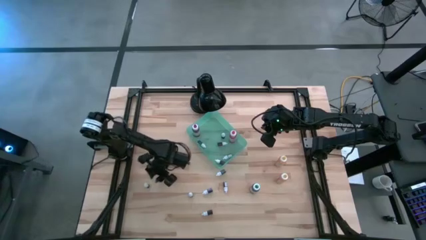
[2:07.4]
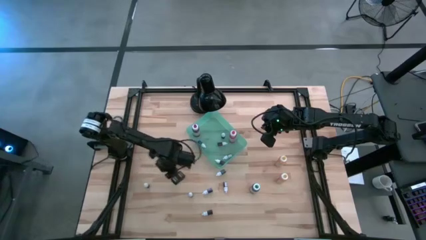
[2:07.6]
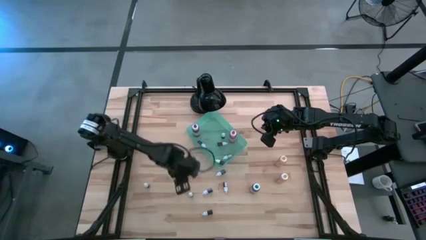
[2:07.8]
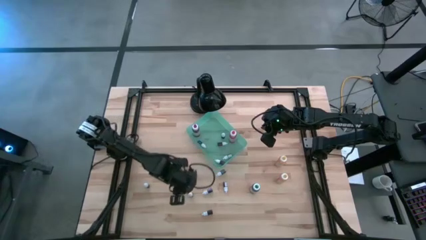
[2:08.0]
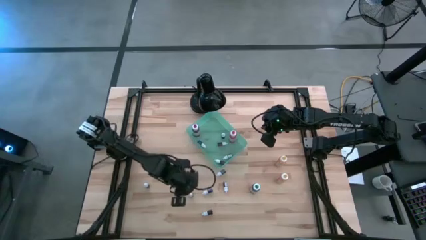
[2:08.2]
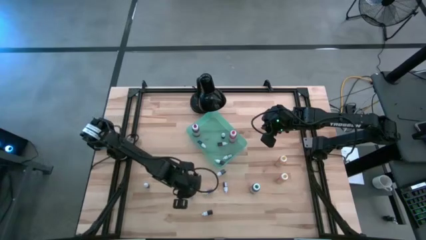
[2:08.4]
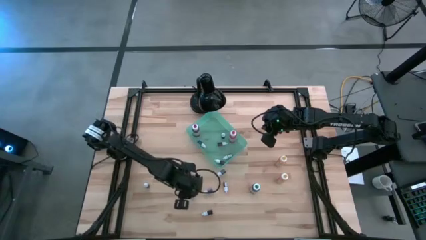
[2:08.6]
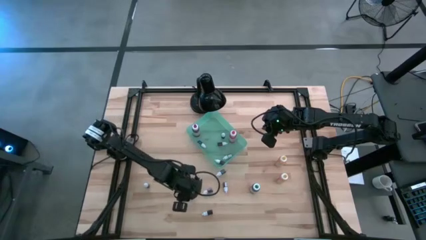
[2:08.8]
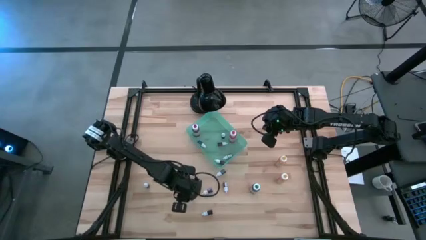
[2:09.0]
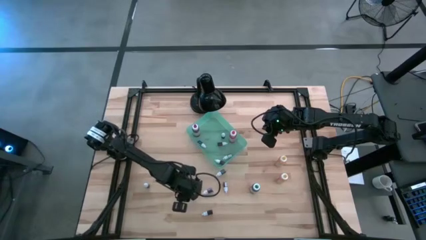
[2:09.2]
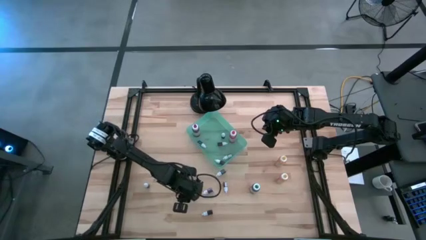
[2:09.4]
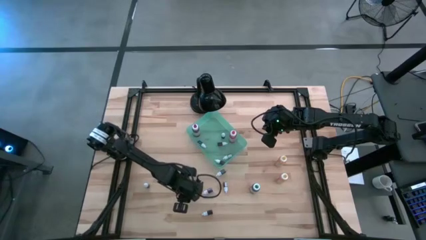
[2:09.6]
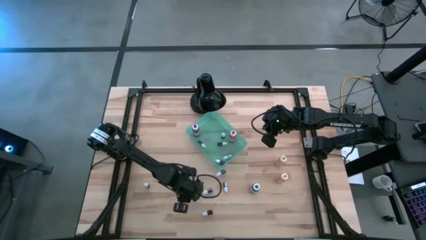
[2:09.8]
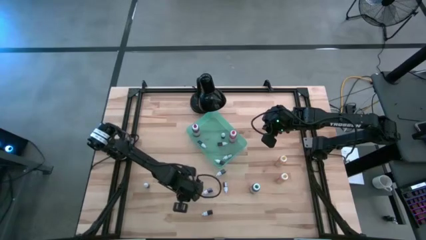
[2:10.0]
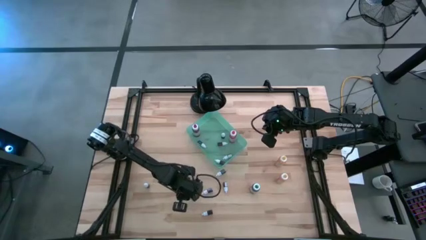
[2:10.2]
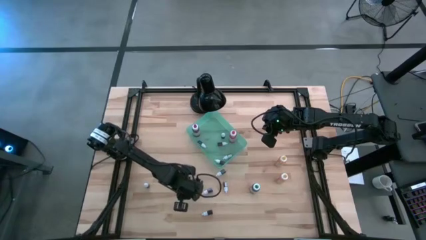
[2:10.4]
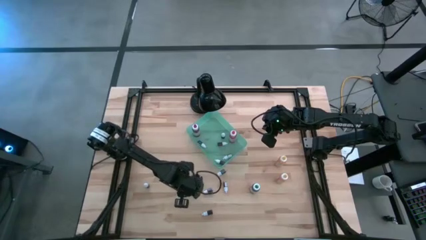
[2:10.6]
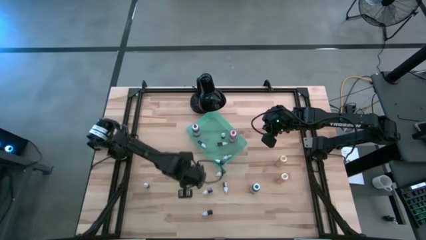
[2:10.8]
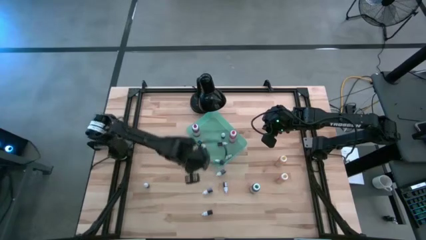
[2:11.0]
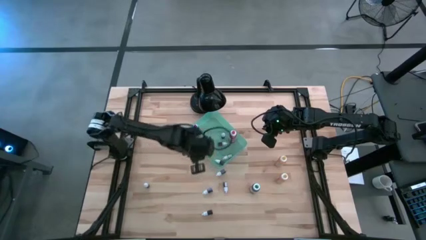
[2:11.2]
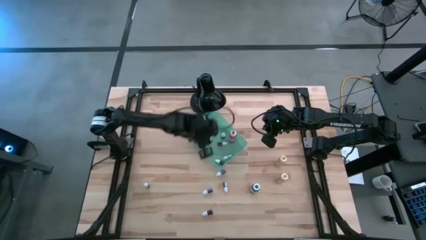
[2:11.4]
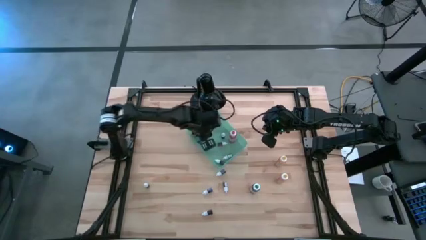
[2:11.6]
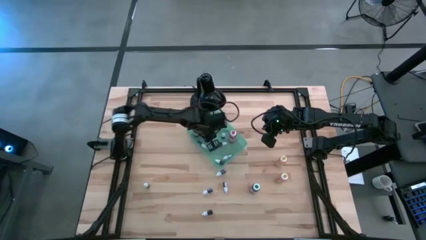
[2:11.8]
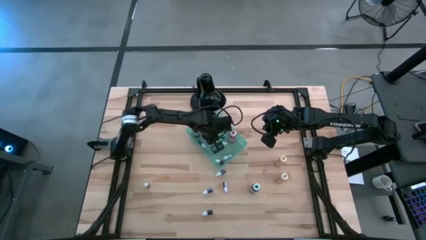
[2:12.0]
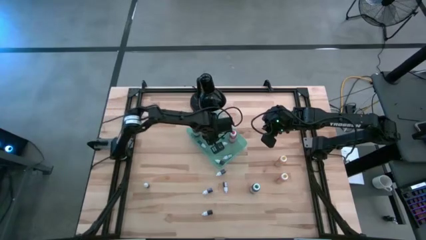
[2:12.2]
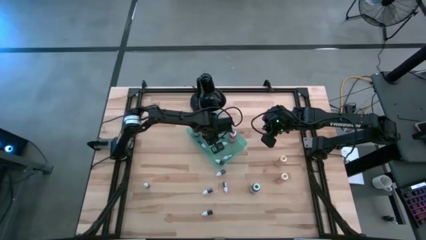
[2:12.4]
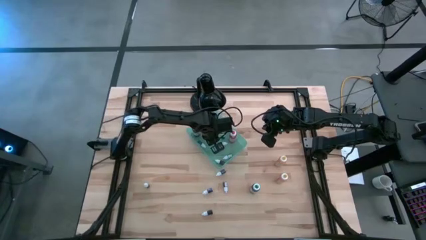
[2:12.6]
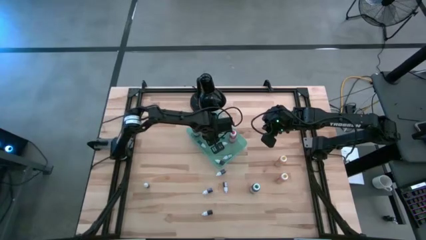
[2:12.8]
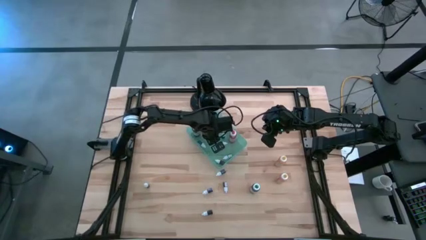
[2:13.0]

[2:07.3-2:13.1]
Task: Pick & Place food coloring
Put the small green food coloring bottle into the green bin

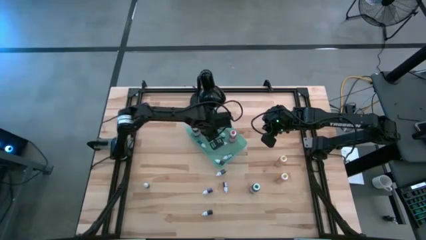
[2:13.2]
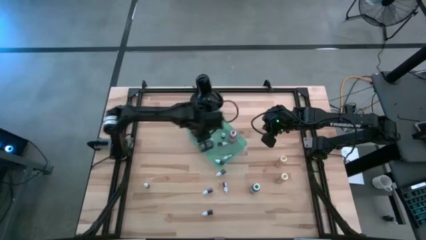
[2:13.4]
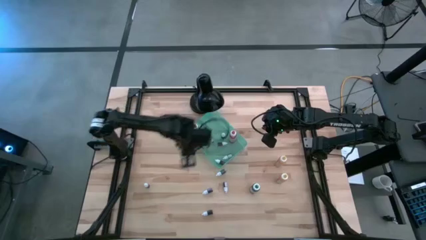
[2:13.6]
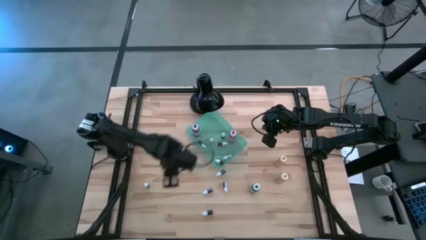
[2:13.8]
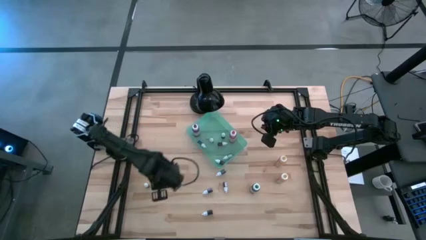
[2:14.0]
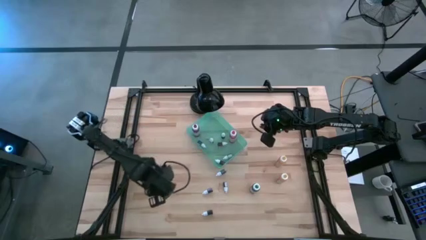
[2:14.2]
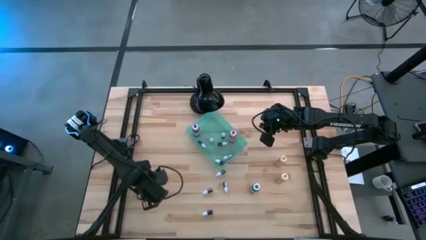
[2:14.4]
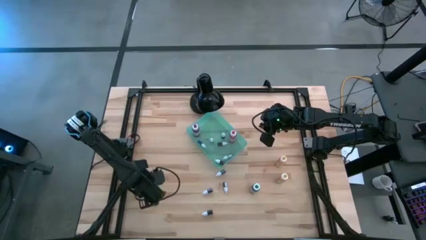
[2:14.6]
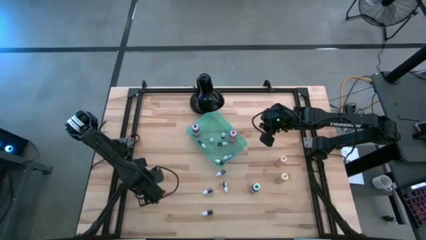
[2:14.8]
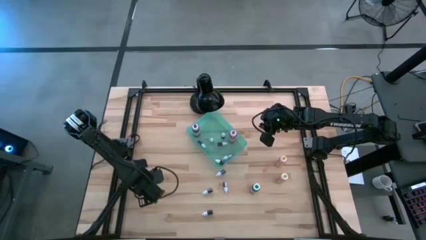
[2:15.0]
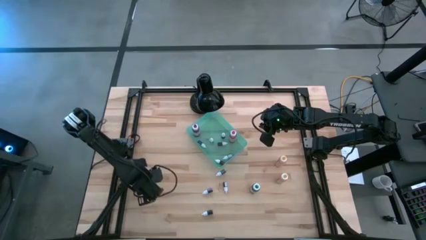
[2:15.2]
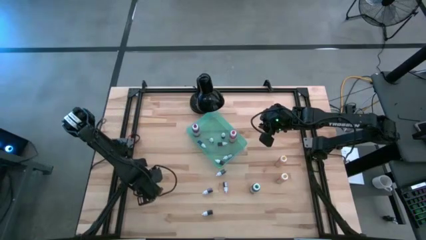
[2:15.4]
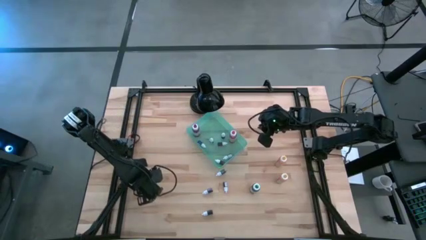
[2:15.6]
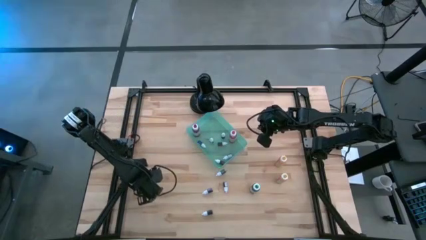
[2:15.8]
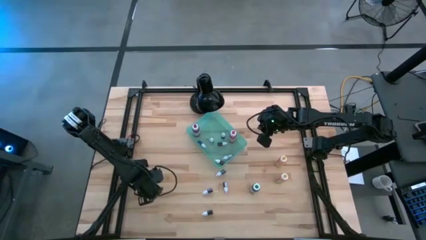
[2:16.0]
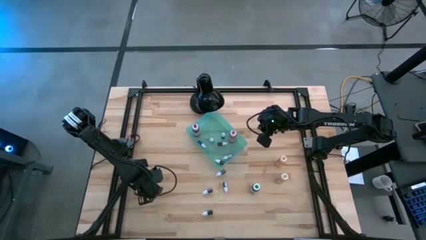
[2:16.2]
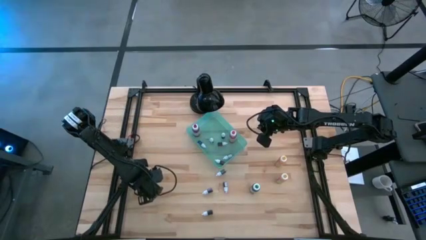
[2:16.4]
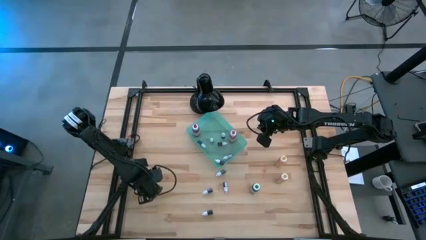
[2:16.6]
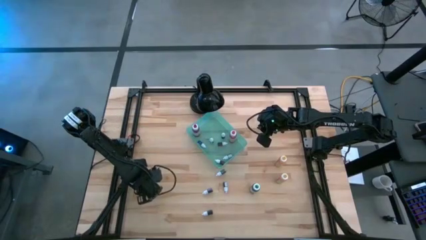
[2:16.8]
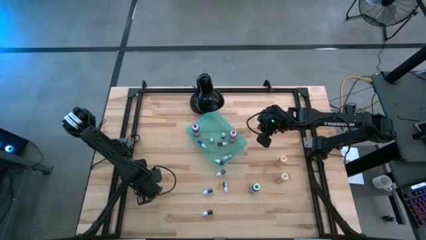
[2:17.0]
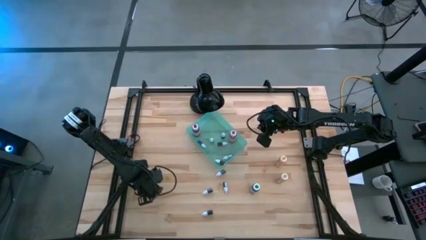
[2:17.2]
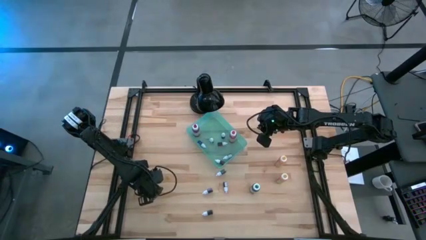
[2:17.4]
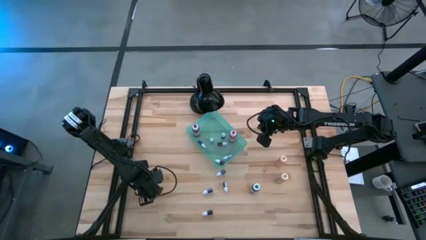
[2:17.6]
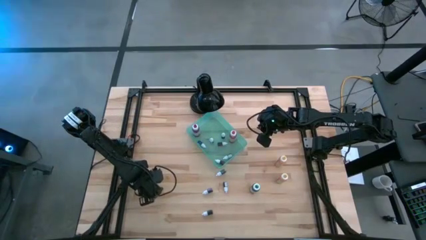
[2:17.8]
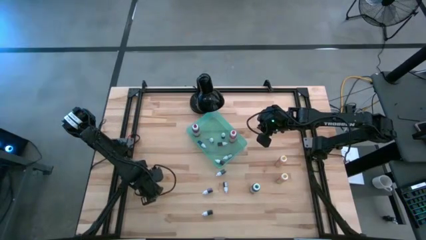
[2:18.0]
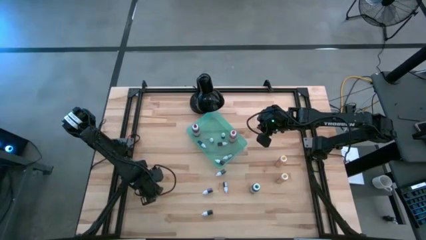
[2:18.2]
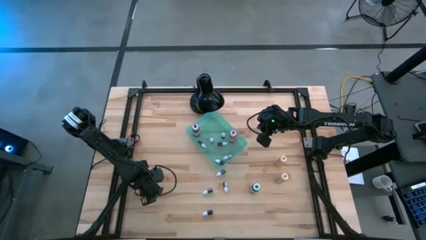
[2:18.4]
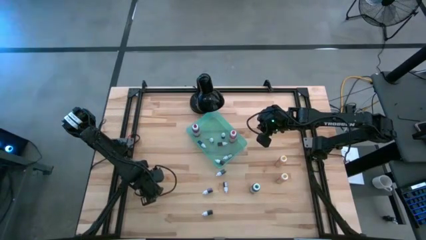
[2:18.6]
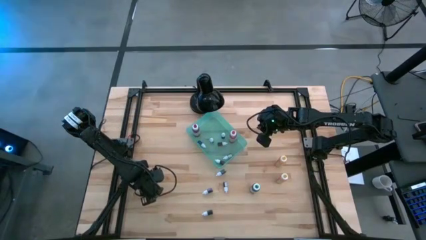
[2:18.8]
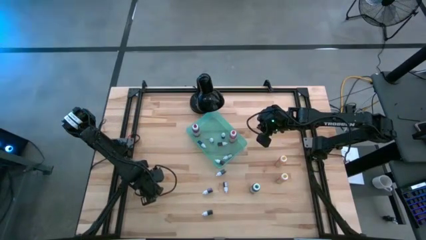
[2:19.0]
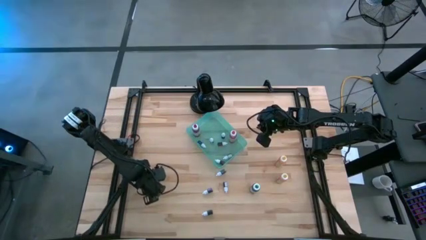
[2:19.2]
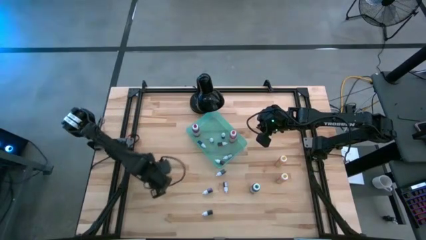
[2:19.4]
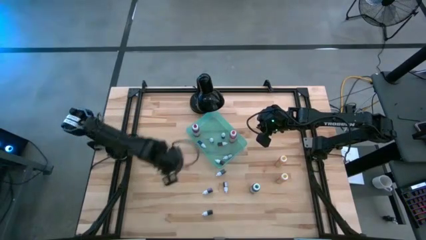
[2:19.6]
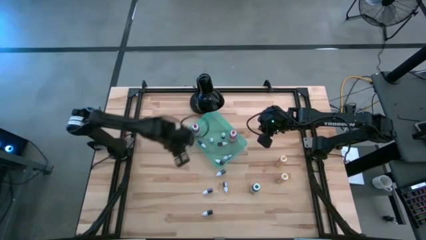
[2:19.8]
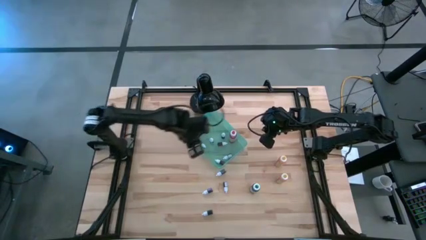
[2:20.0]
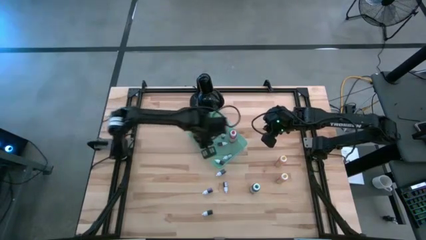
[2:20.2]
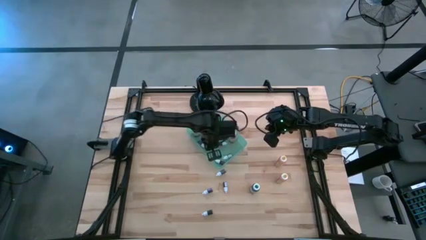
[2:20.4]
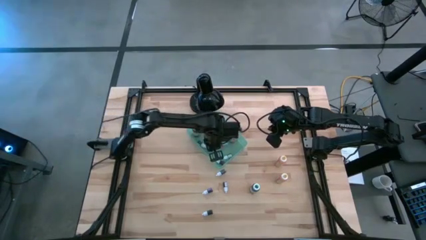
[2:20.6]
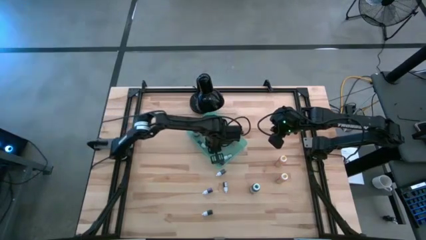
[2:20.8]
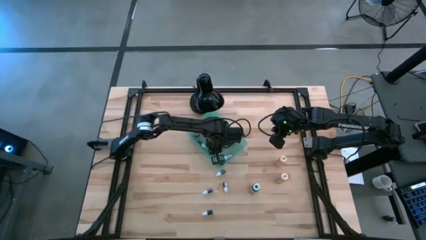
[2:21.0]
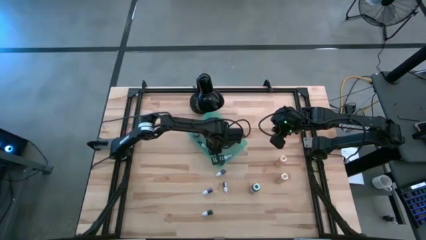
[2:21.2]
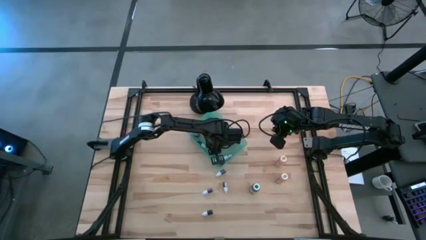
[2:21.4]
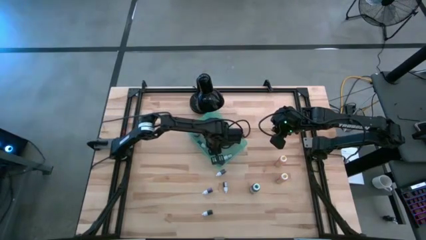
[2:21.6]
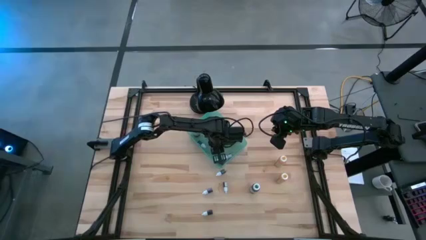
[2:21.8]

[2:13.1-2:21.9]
Put the small red food coloring bottle into the green bin

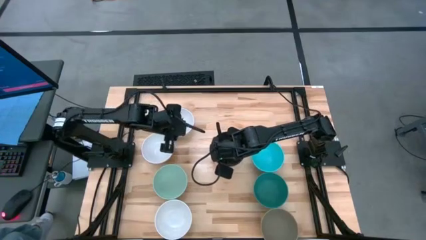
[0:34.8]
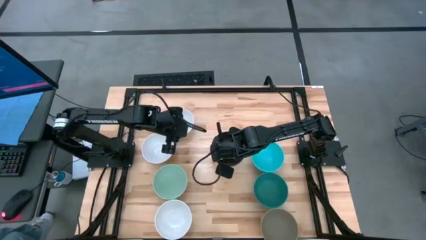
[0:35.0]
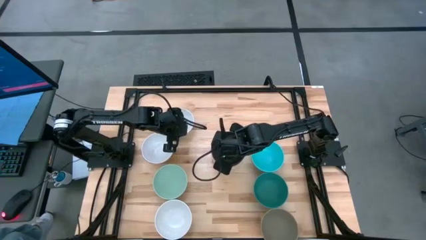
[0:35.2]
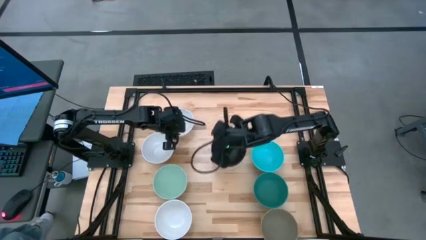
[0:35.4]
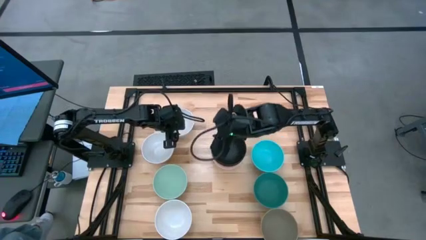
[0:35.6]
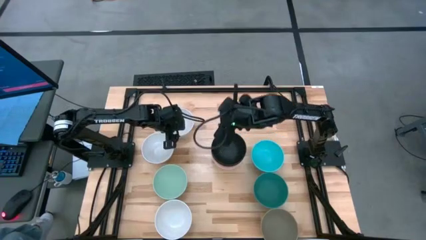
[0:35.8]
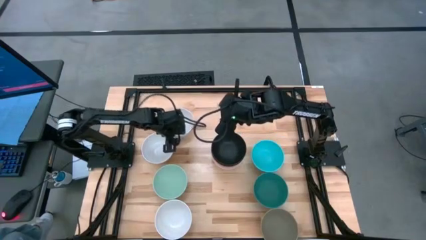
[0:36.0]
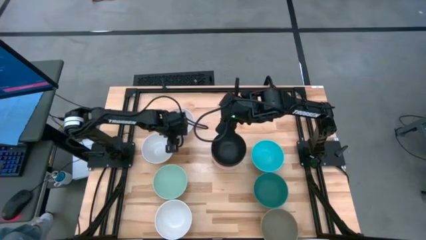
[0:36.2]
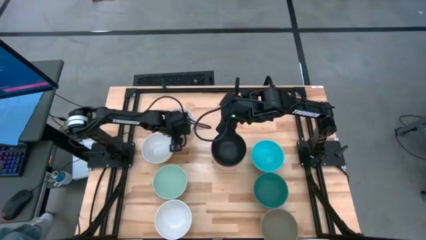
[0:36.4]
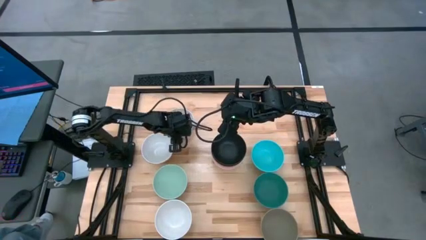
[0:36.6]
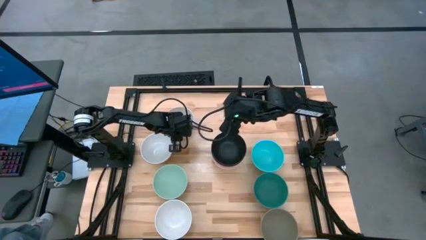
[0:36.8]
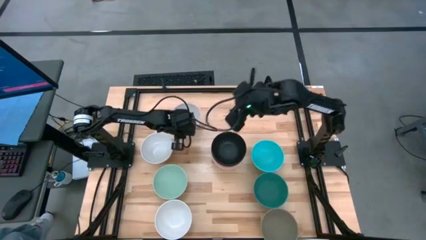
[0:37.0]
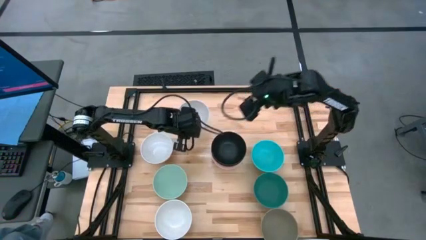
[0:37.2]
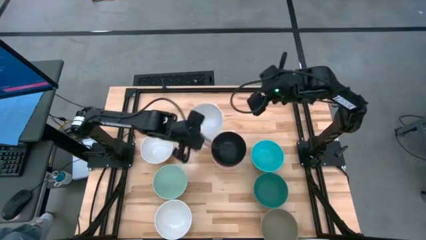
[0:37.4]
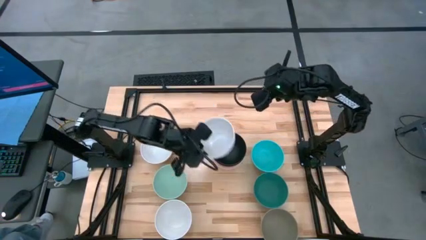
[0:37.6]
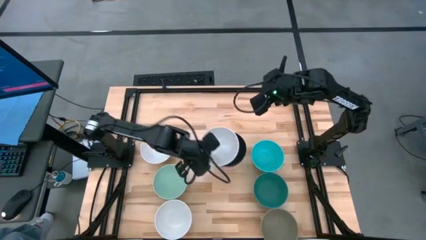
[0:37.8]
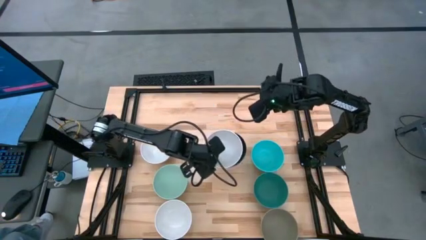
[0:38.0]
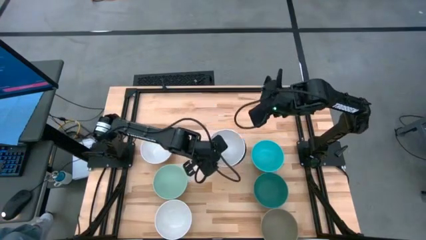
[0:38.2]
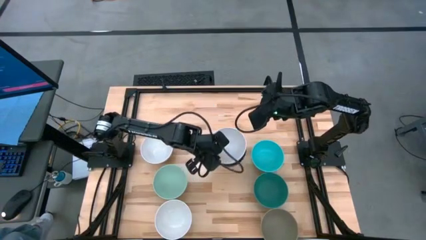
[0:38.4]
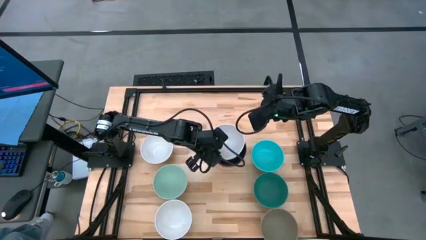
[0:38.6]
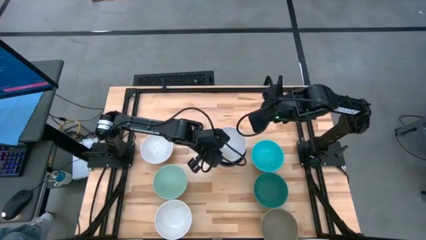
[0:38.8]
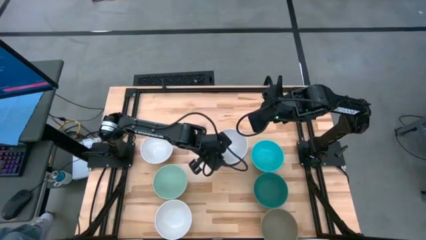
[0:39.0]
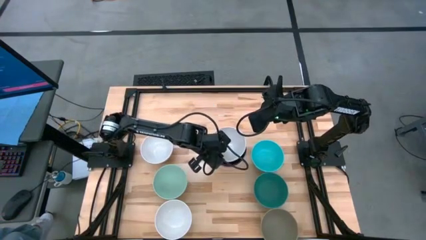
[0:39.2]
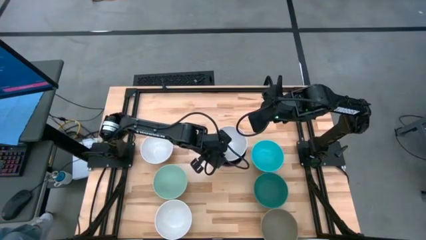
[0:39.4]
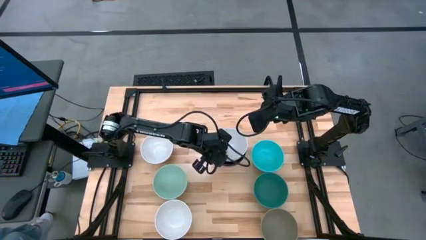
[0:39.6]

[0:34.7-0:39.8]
Task: Nest bowls inside each other
Stack the white bowl on the black bowl
